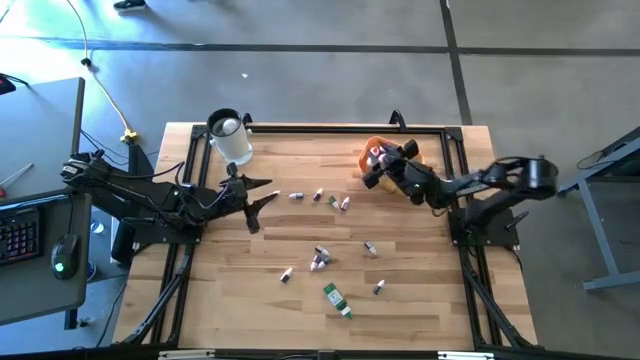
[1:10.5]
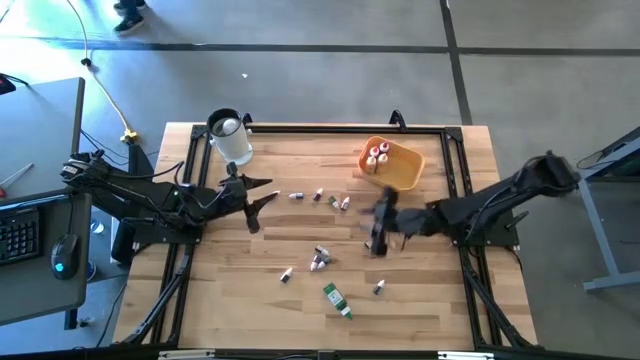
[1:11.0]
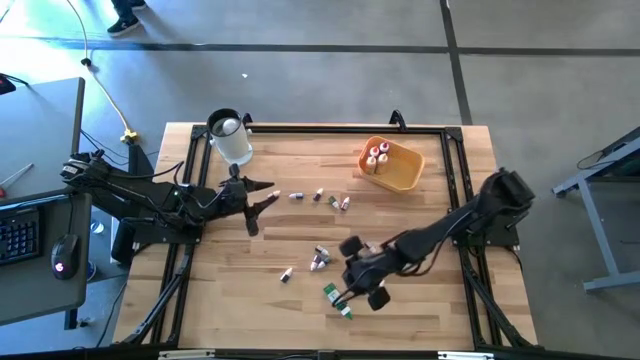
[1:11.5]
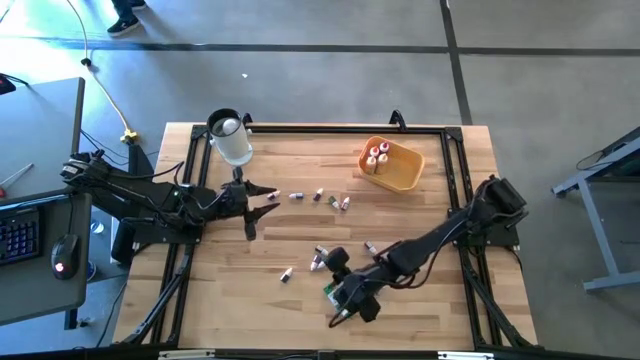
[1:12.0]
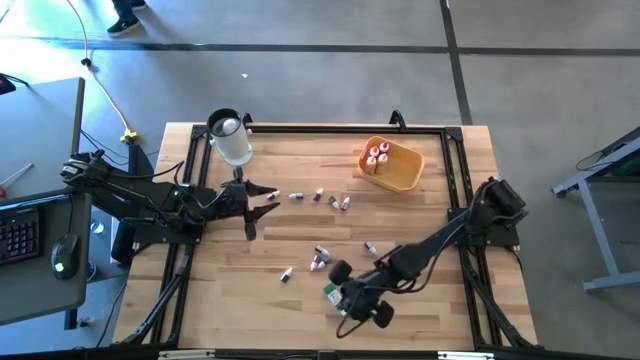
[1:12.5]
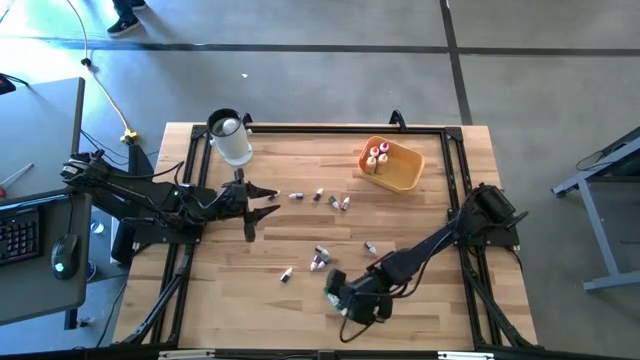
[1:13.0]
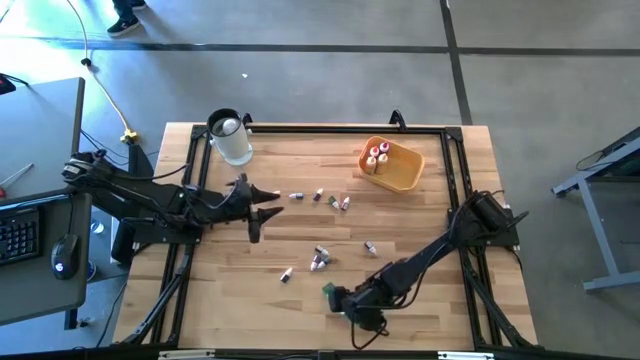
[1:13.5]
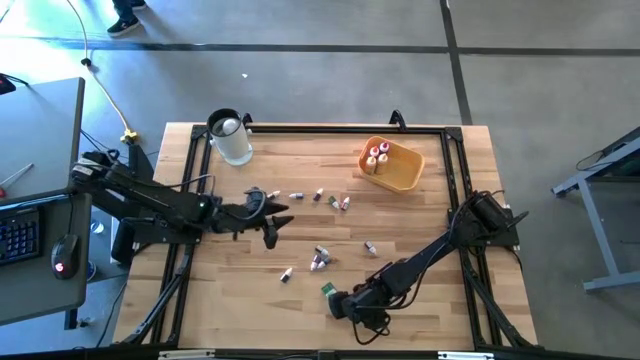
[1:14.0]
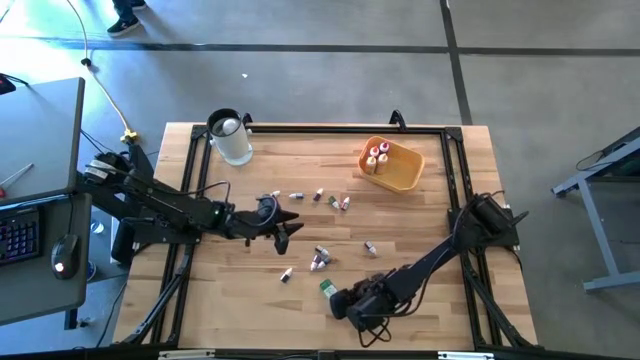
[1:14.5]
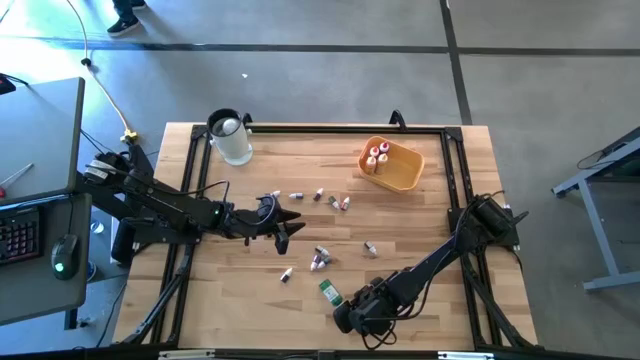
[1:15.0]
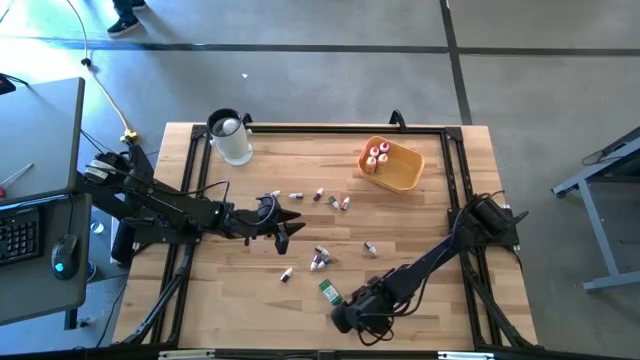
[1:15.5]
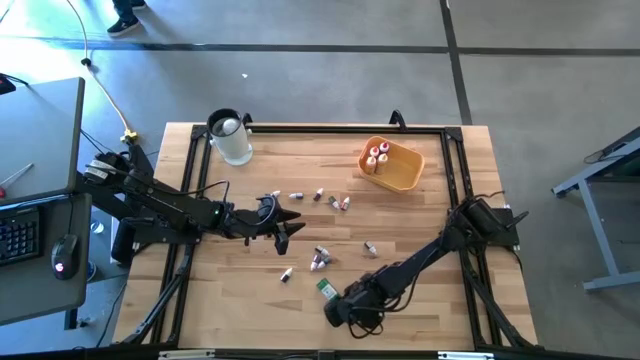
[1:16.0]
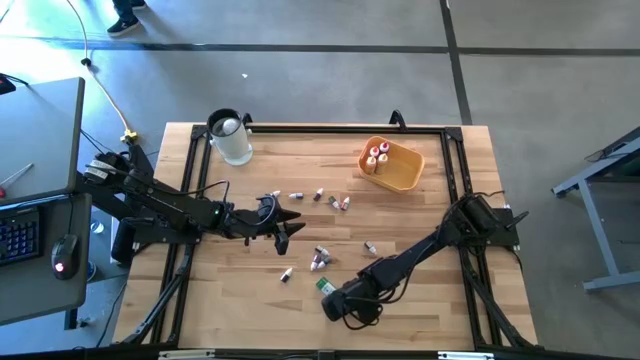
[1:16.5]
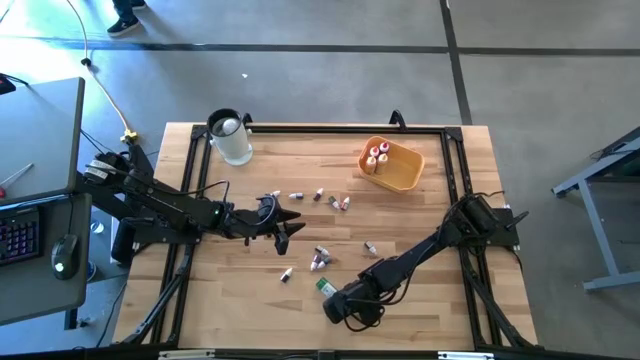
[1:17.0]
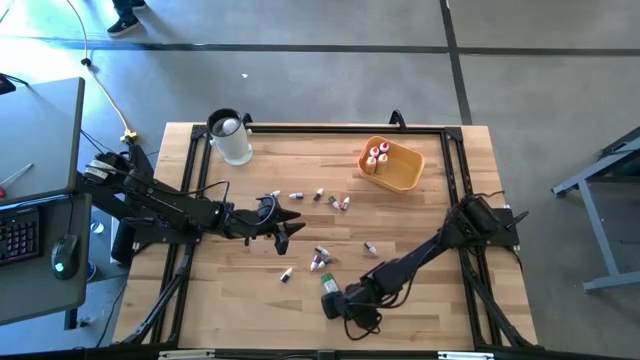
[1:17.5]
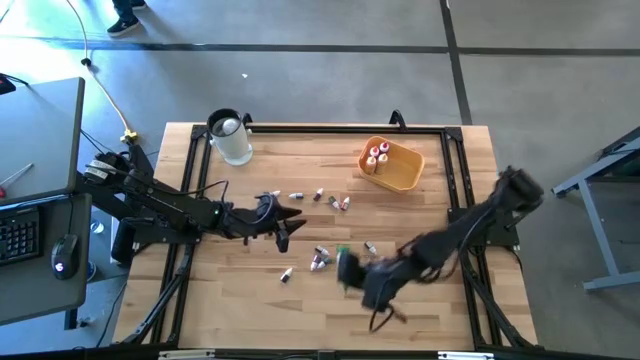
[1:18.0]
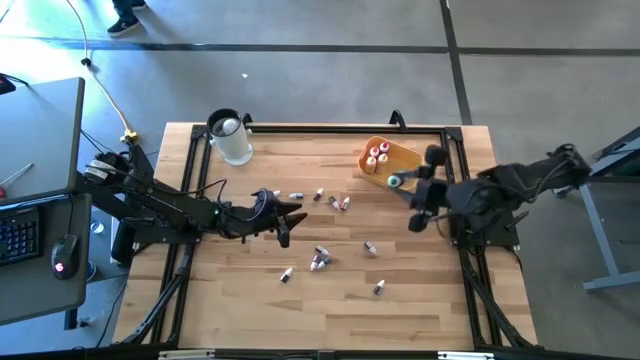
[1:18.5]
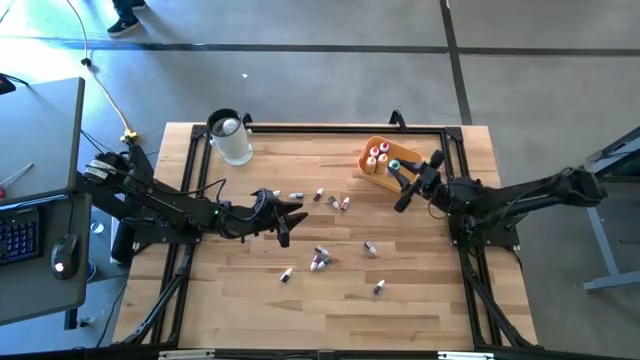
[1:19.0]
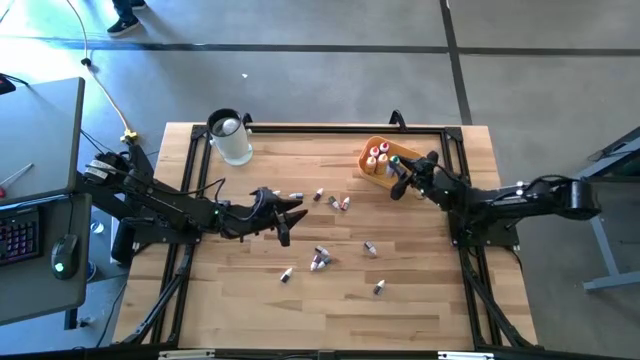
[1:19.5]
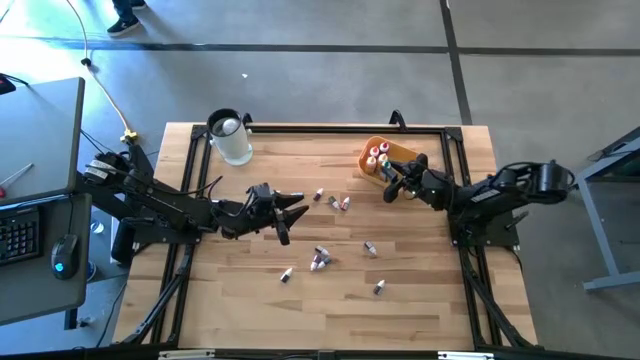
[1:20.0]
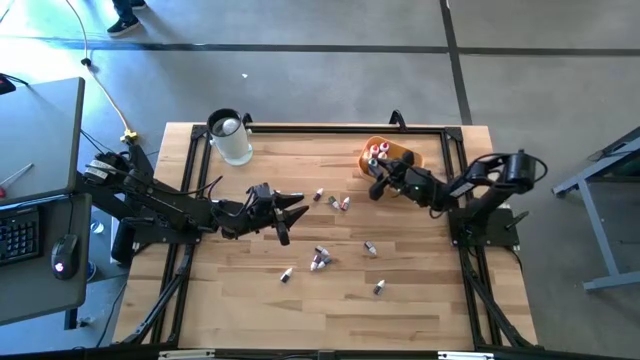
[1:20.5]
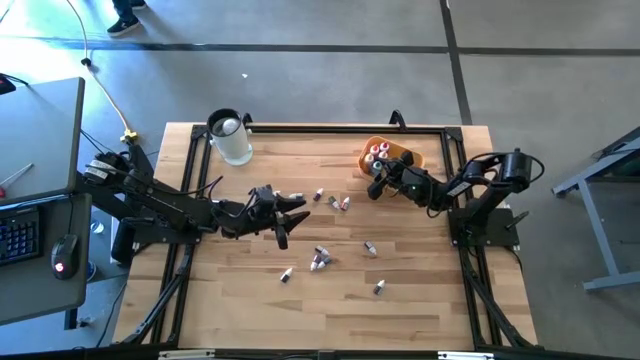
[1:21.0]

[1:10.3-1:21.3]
Task: Pick & Place food coloring
Put the large green food coloring bottle into the yellow bin

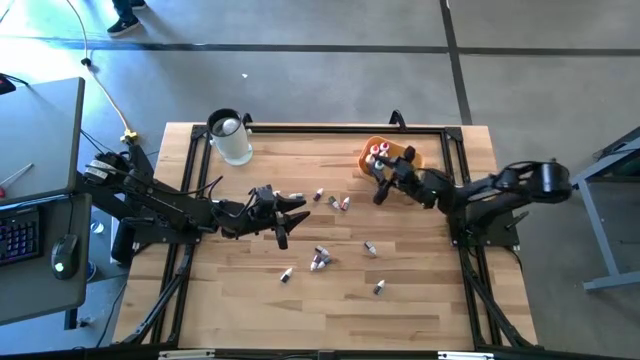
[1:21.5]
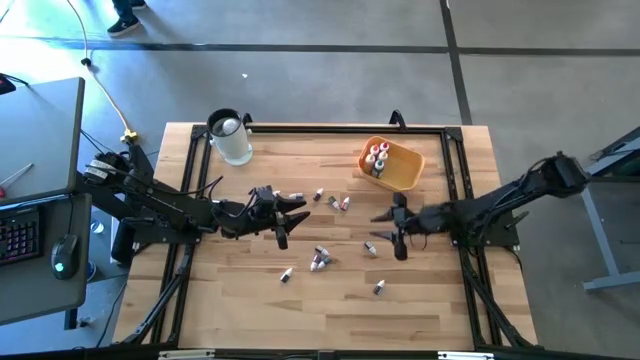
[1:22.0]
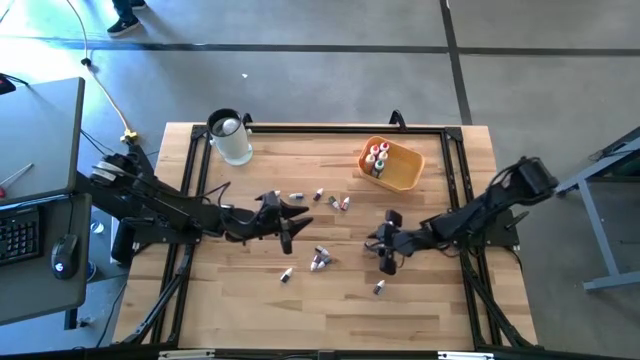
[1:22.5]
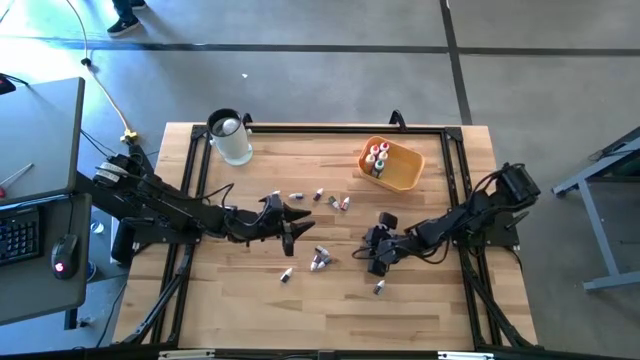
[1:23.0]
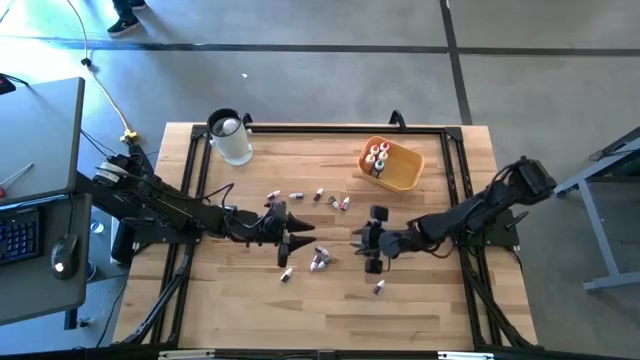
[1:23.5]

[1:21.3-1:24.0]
Put the small red food coloring bottle into the yellow bin

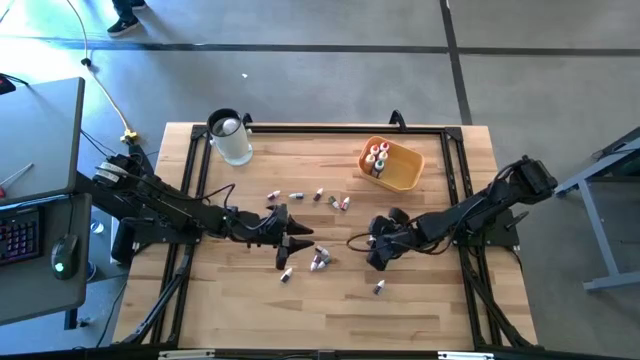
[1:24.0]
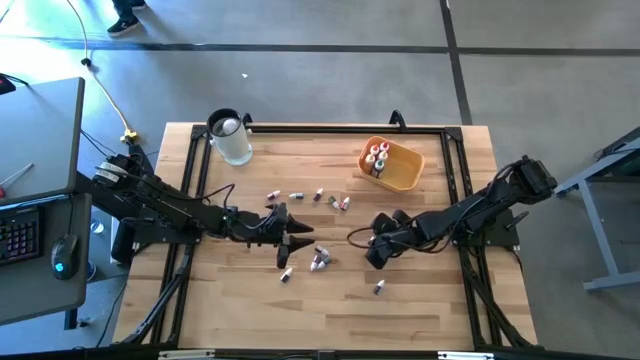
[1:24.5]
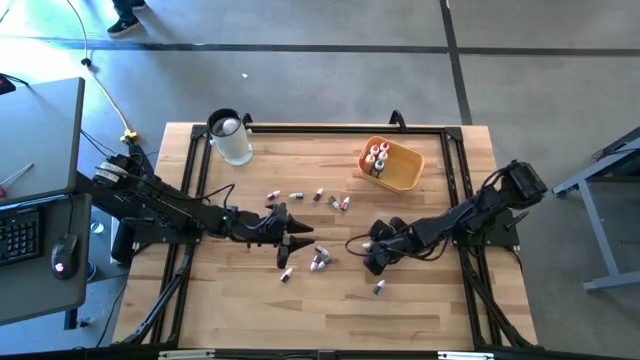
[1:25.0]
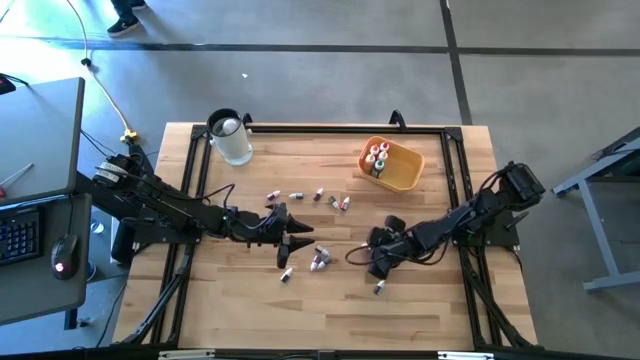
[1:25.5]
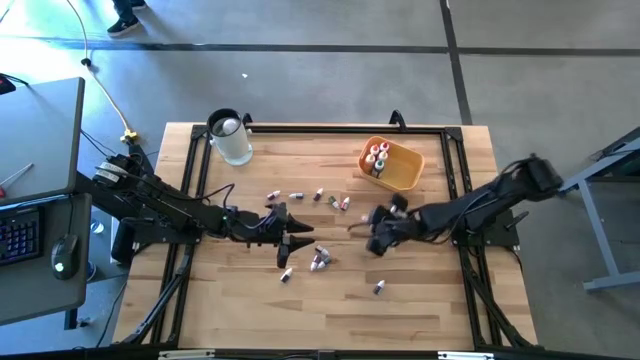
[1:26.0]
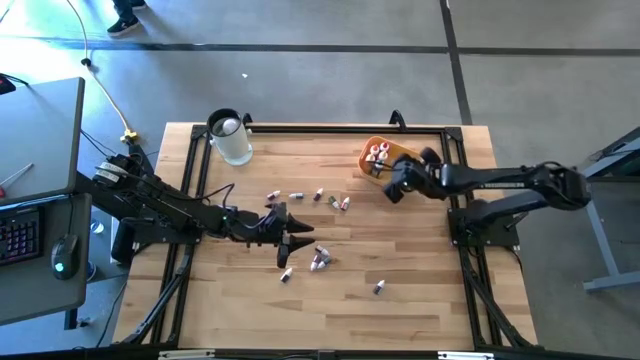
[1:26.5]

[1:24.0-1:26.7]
Put the small red food coloring bottle into the yellow bin

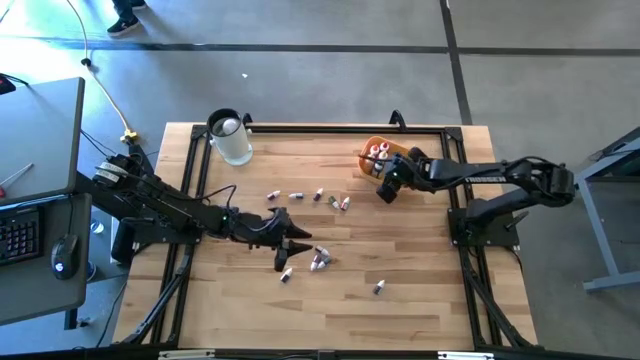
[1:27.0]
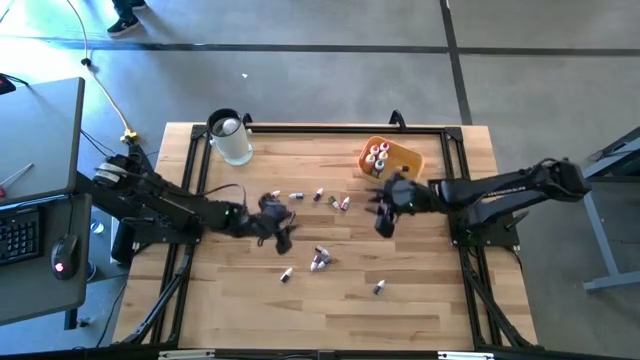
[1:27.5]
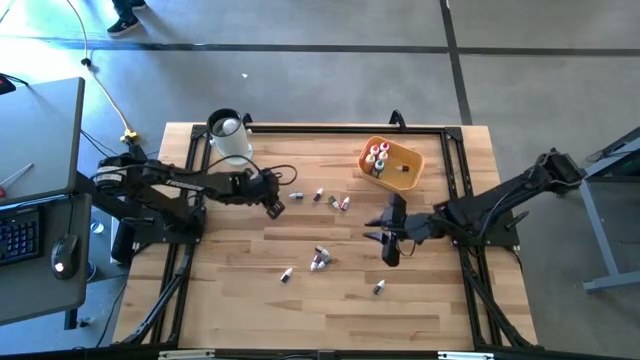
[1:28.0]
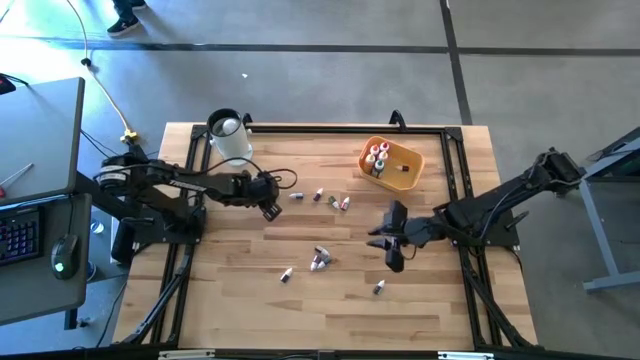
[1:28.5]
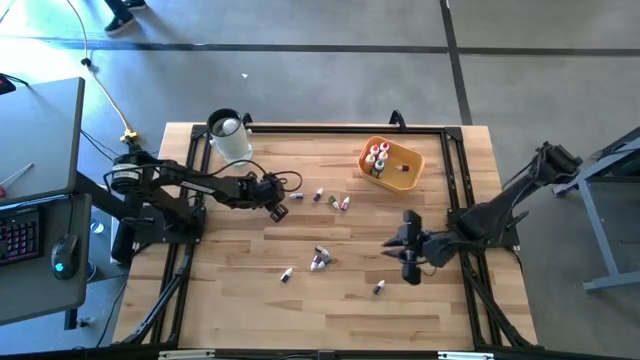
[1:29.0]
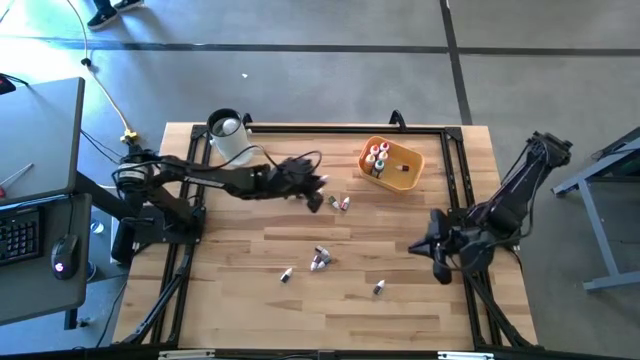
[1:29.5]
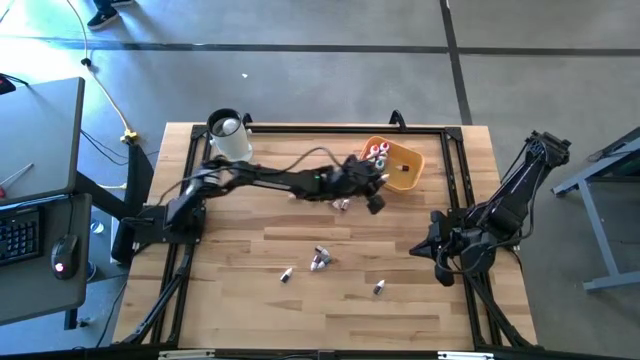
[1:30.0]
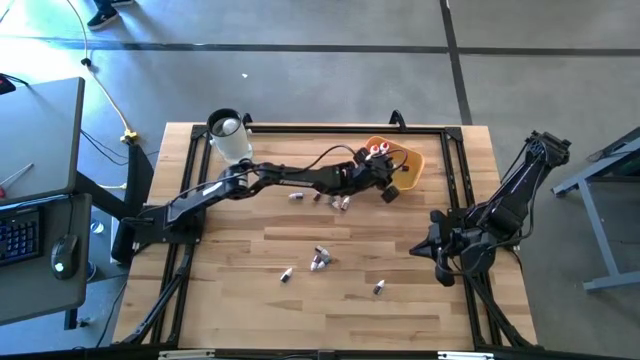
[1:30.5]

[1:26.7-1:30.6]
Put the small left red food coloring bottle into the yellow bin

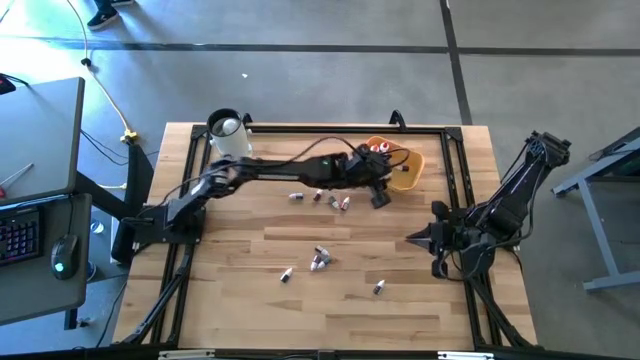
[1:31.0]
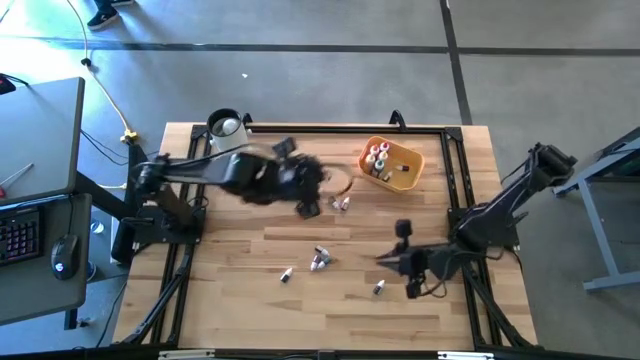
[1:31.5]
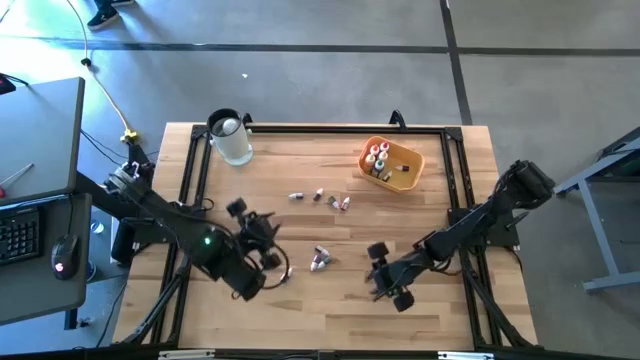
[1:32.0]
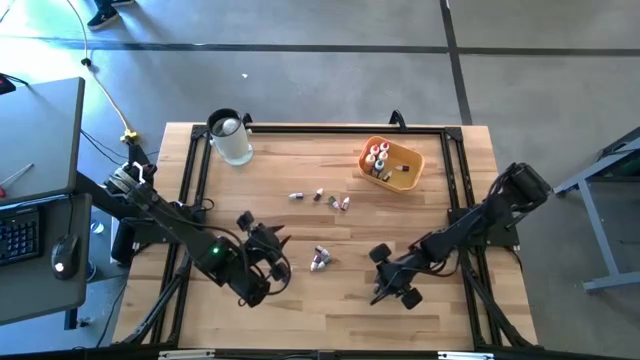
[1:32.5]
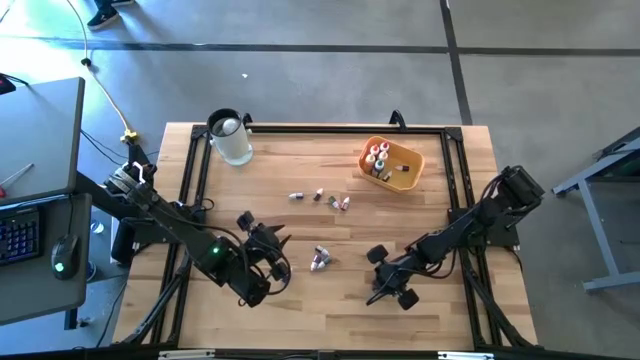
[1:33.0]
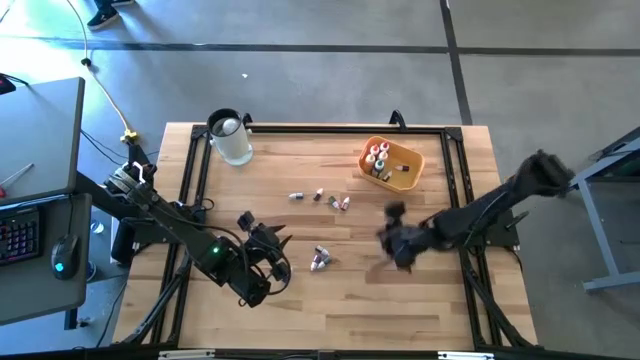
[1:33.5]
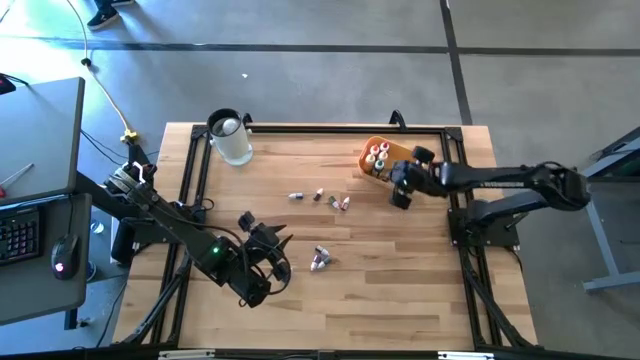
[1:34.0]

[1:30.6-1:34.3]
Put the bottom right small black food coloring bottle into the yellow bin
